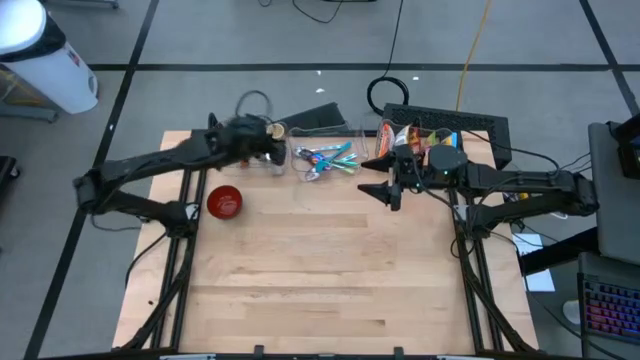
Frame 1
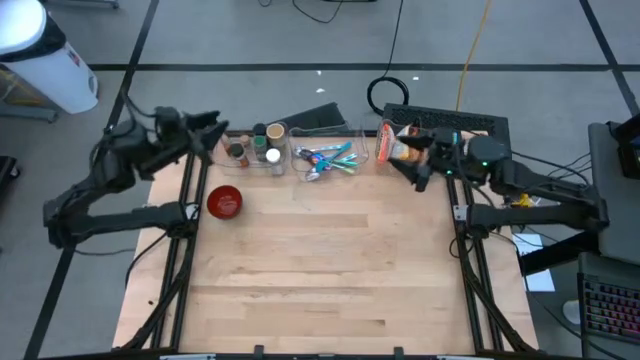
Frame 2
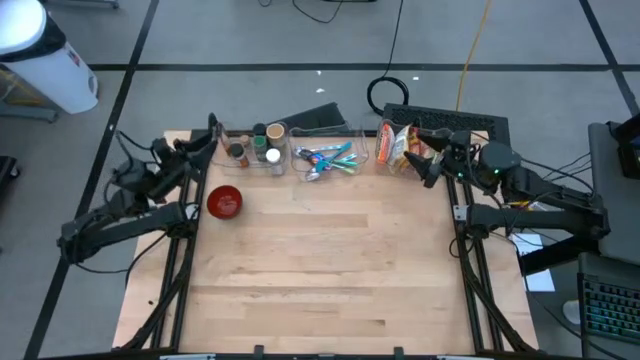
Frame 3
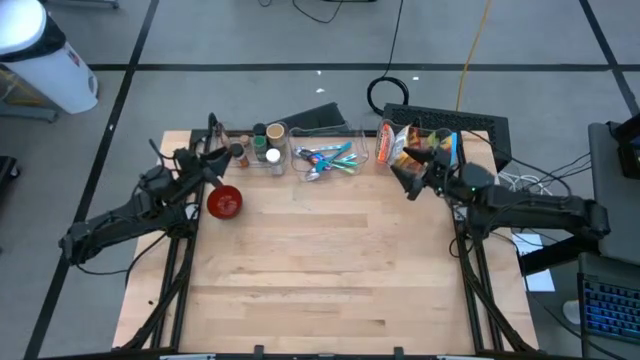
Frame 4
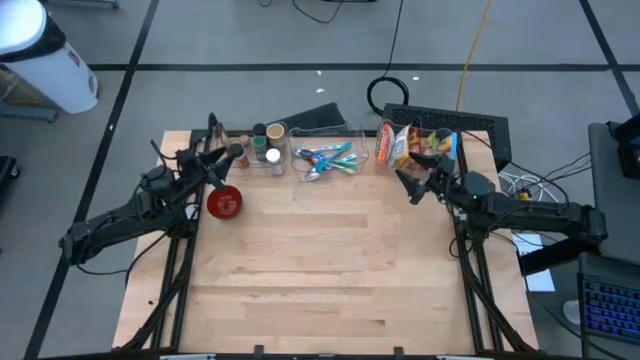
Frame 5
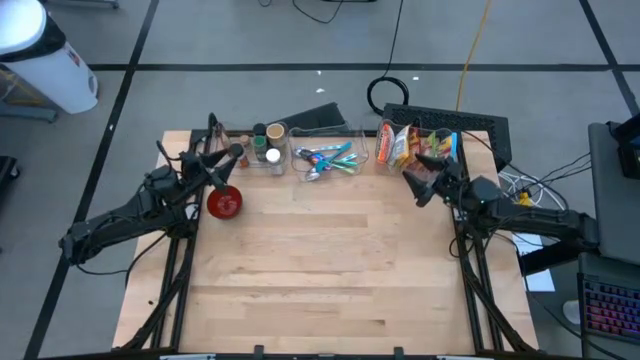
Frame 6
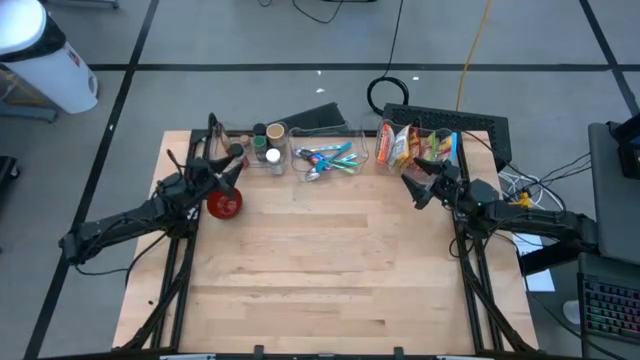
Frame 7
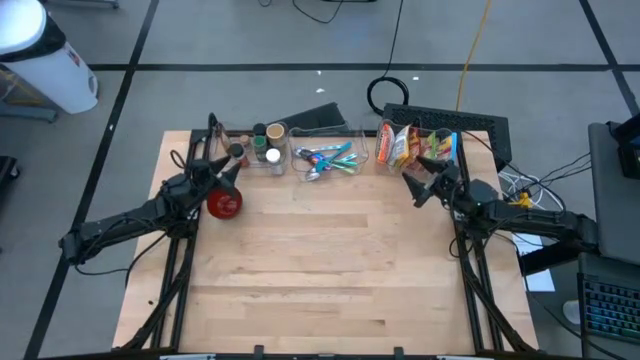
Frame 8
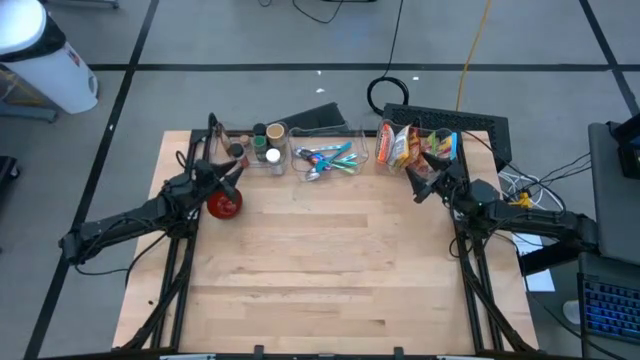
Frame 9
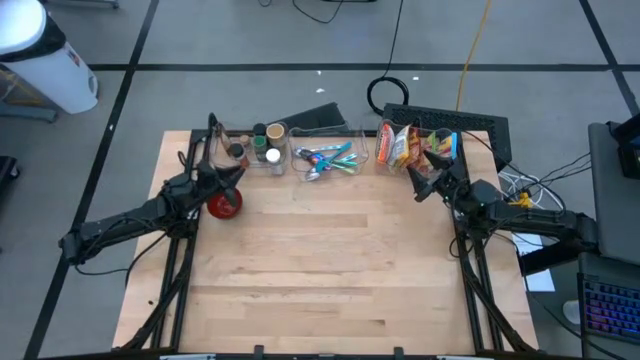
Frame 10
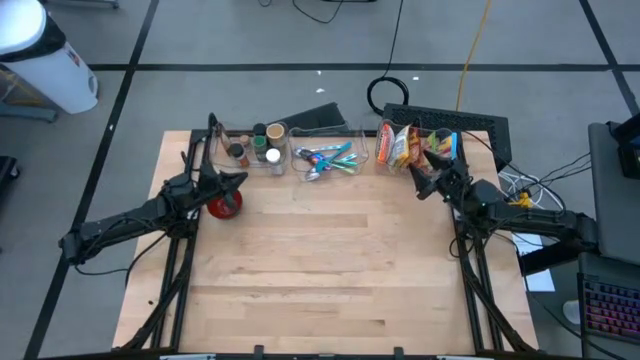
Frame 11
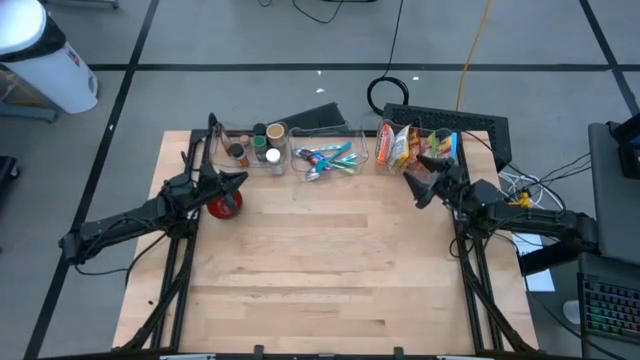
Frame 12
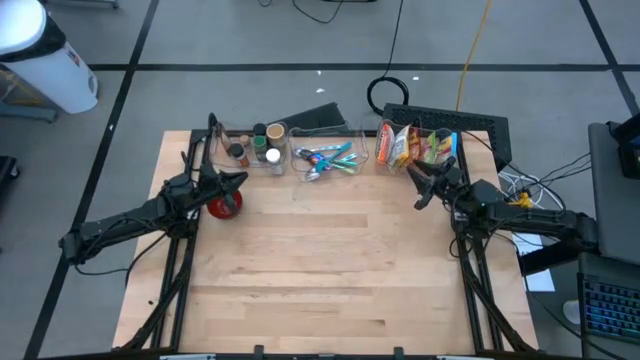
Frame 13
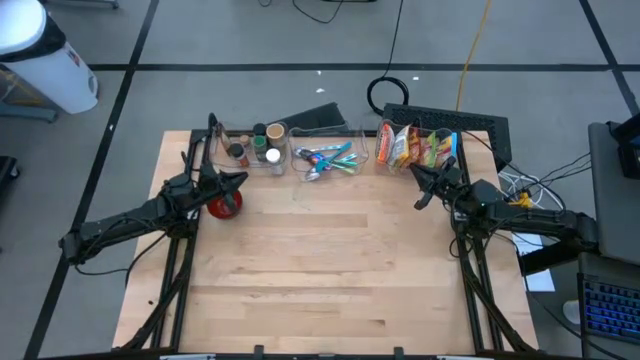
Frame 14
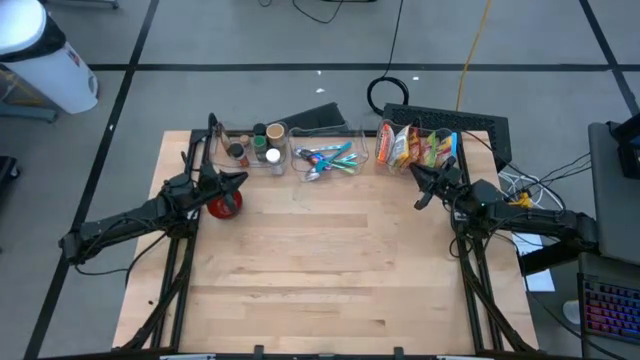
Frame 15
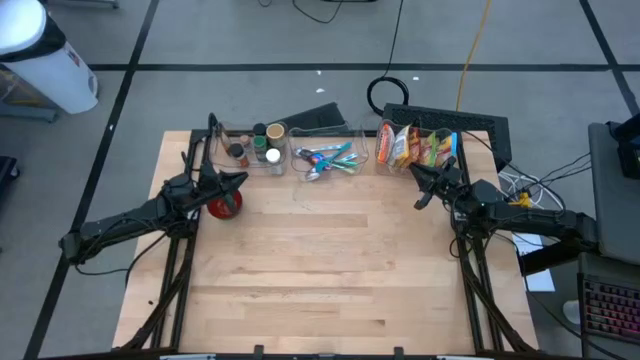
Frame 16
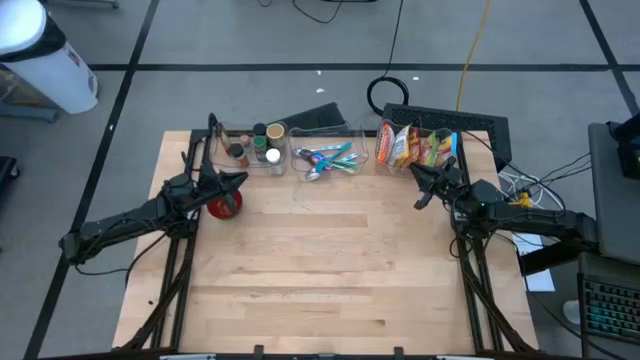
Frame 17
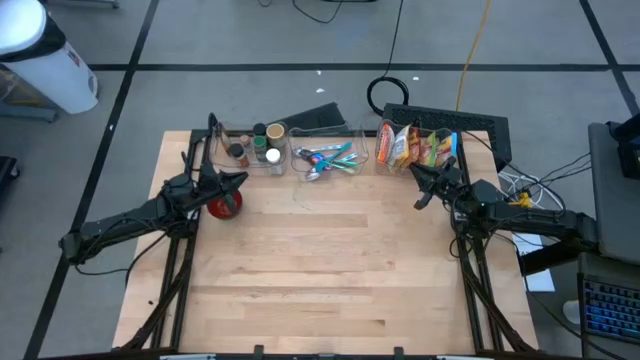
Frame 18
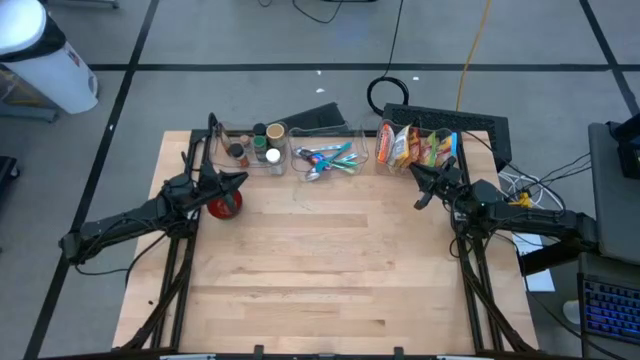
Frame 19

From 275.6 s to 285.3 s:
Task: Pick & Place Food Item
Return to Home Position

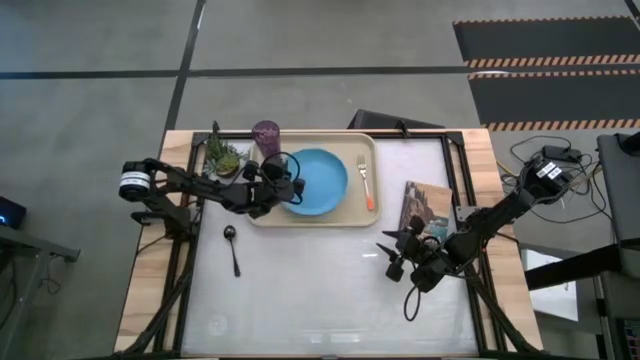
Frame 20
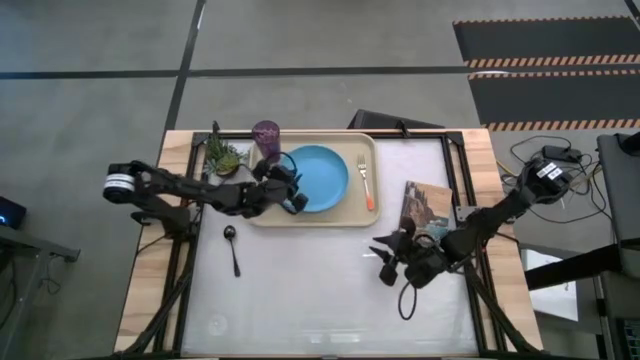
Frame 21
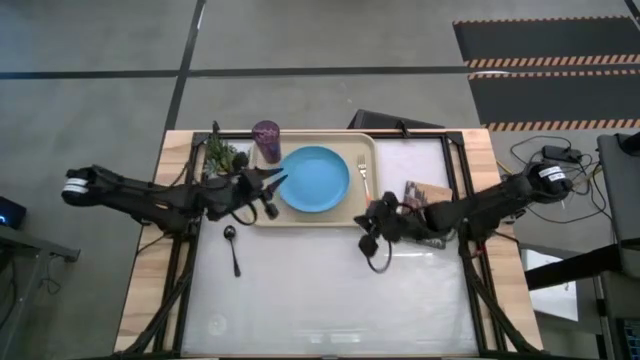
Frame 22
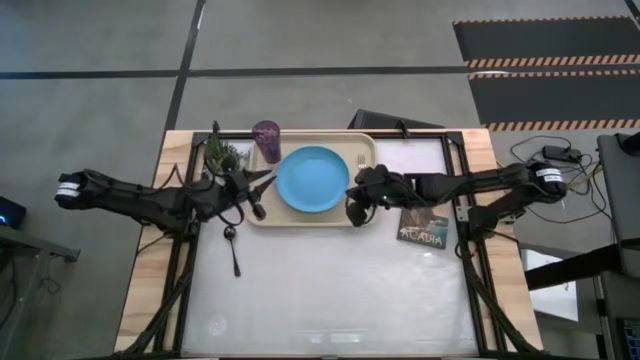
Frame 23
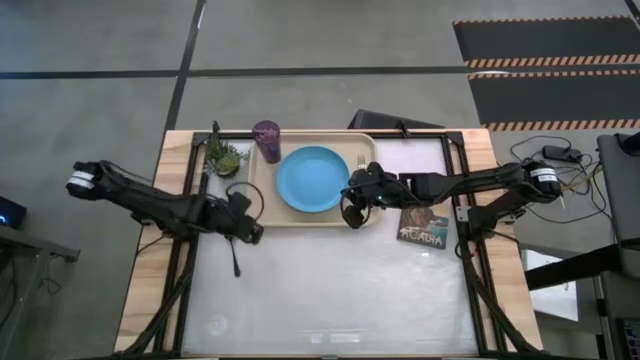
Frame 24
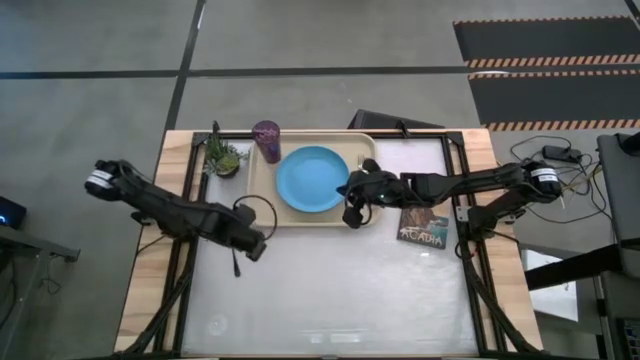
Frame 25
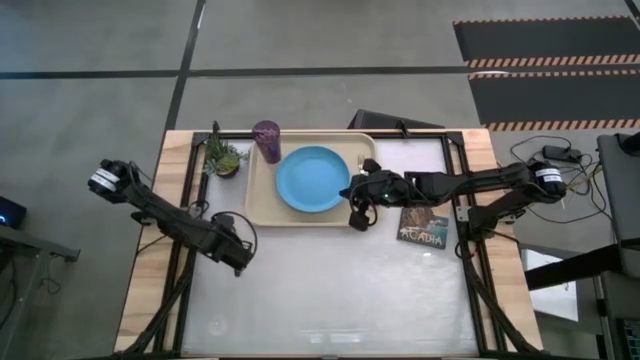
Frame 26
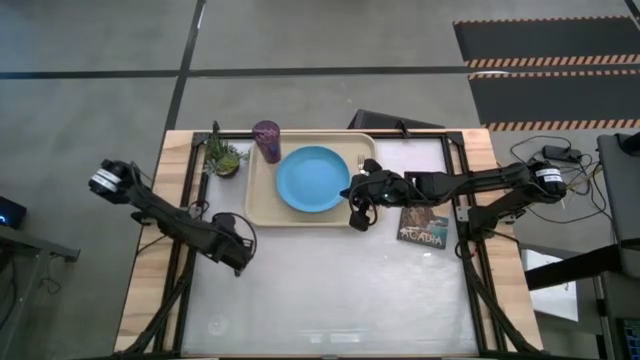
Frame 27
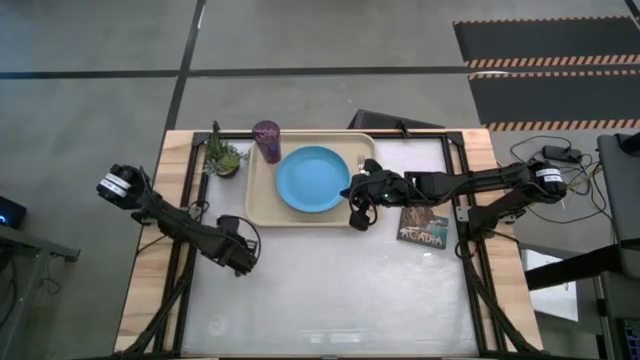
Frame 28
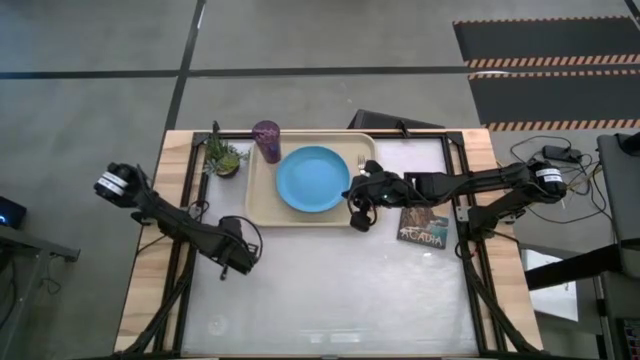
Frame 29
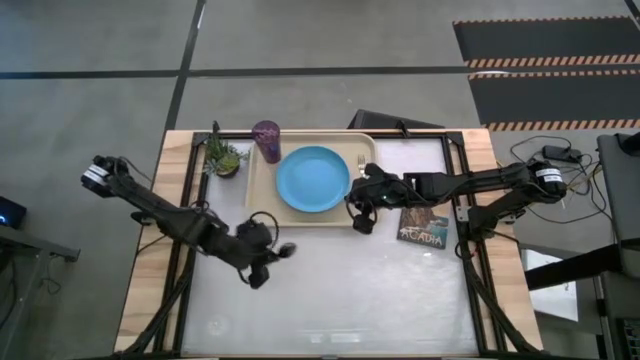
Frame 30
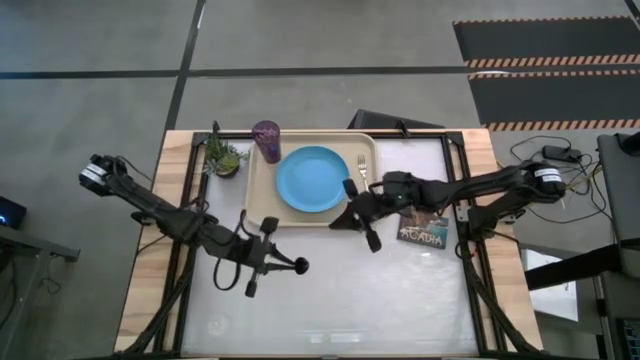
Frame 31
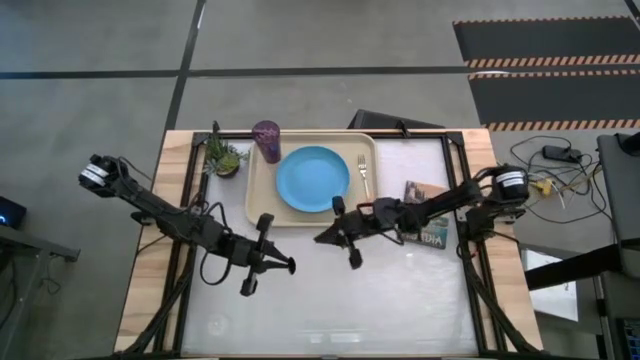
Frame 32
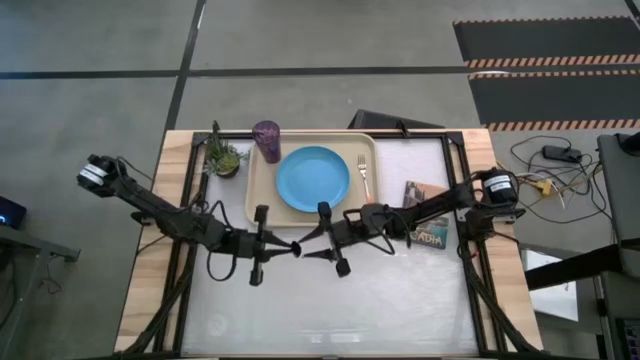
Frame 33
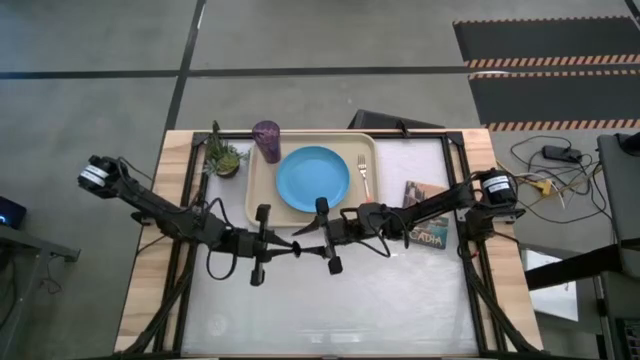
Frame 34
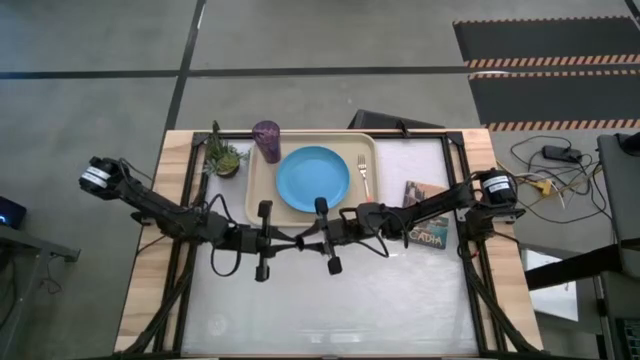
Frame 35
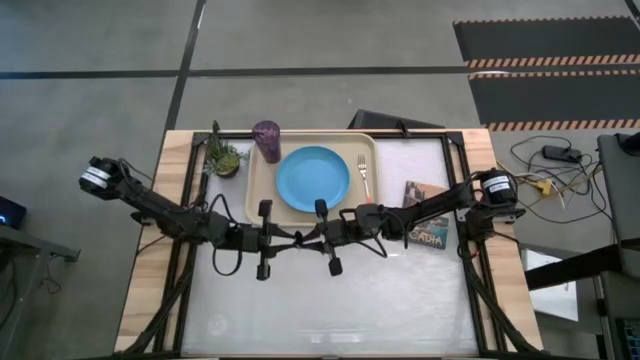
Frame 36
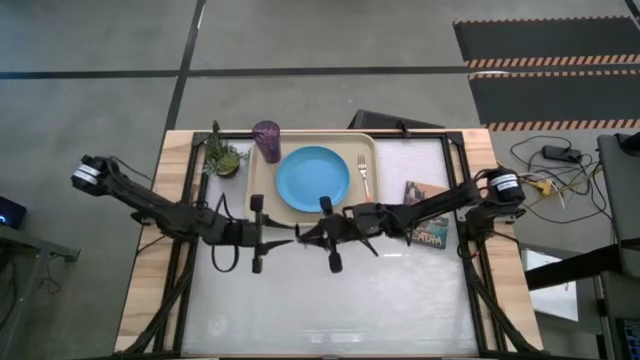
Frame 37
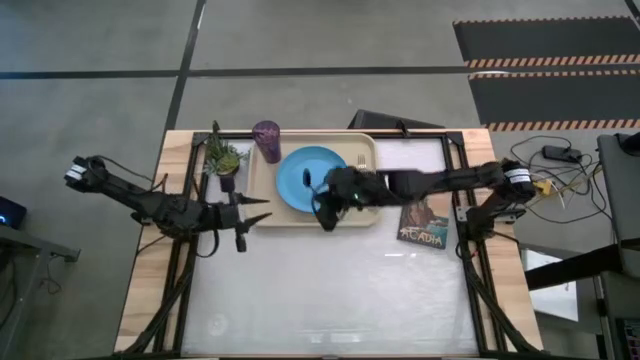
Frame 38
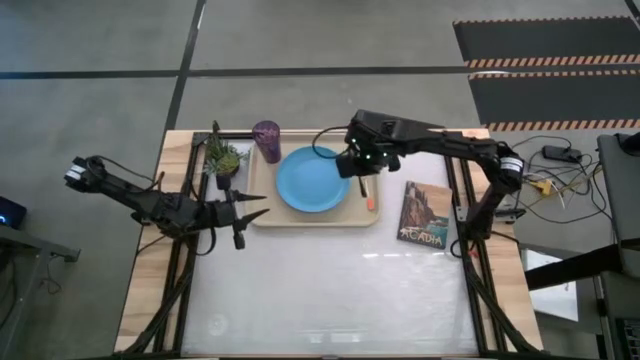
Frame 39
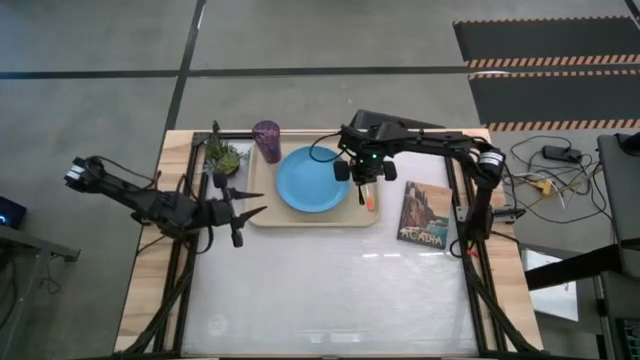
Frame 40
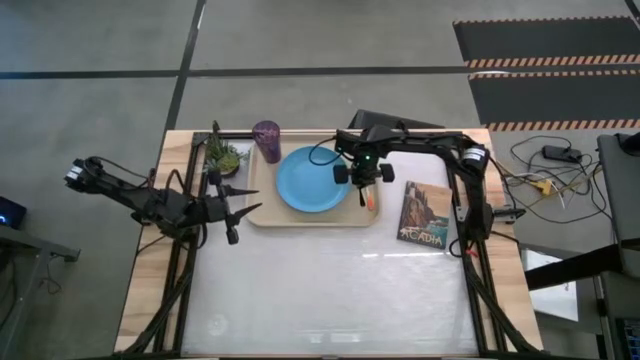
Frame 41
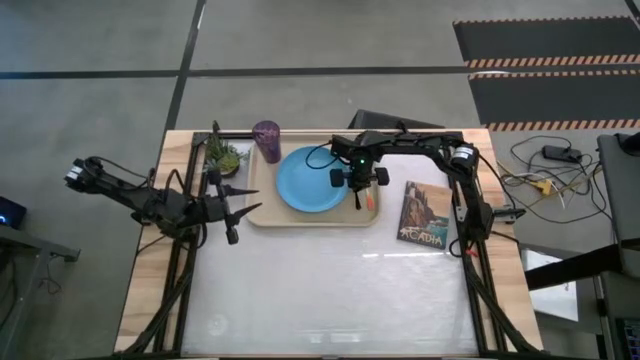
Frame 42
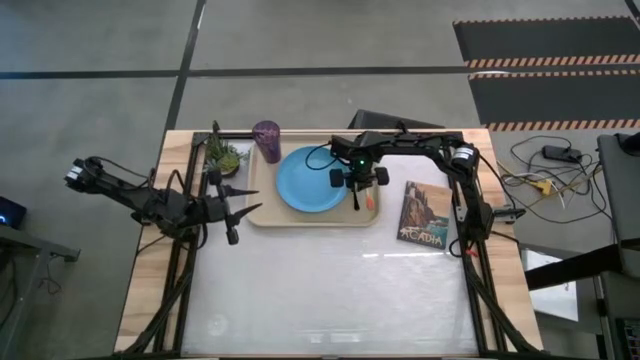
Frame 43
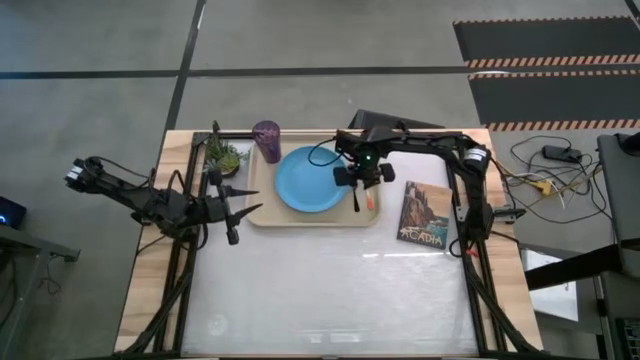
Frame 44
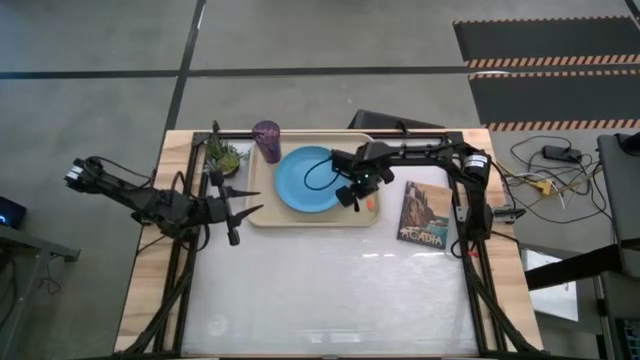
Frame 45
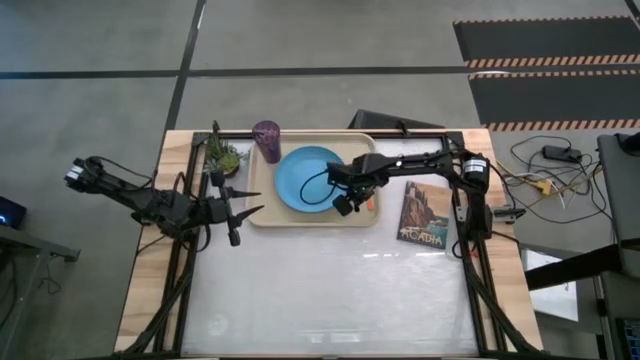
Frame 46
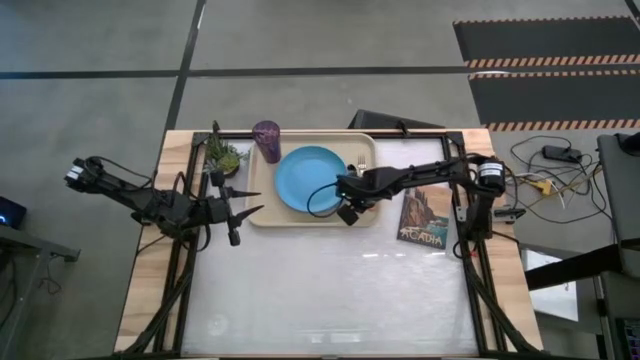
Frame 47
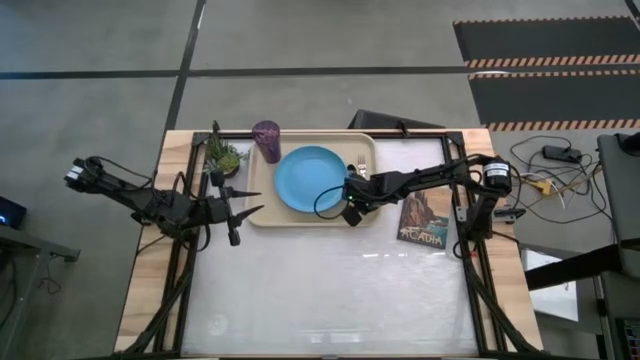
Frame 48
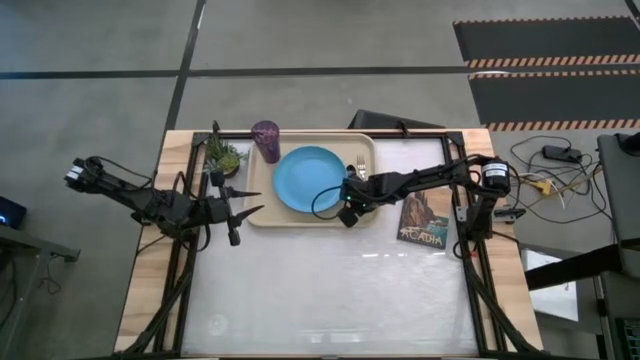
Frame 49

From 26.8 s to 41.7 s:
Task: Pick and place plate/cup/fork/spoon on tray
Put the black spoon on the brown tray to the right of the blue plate
